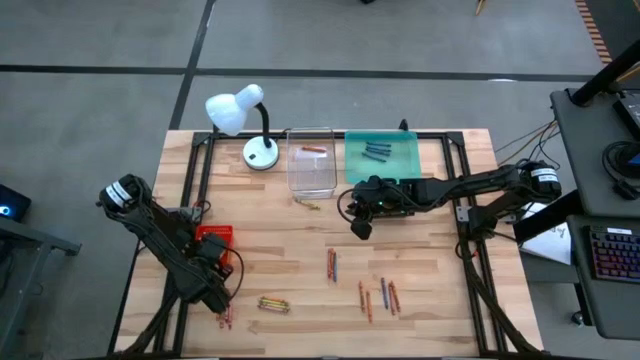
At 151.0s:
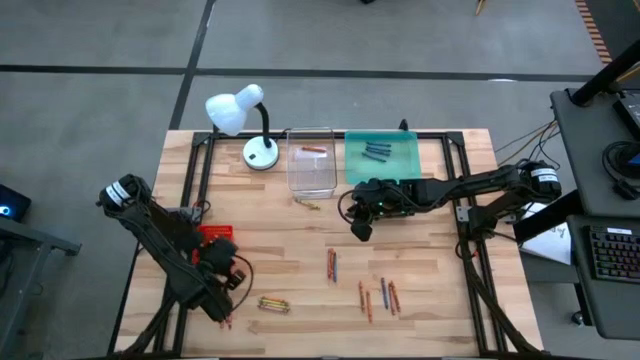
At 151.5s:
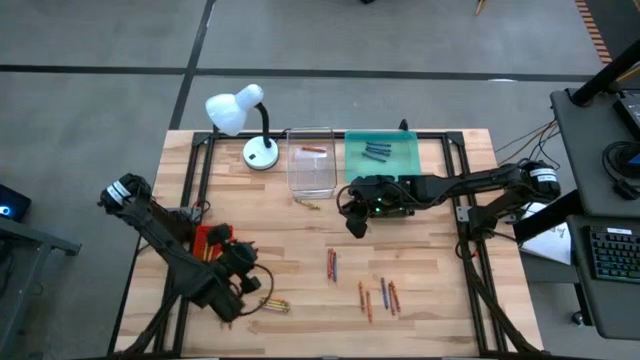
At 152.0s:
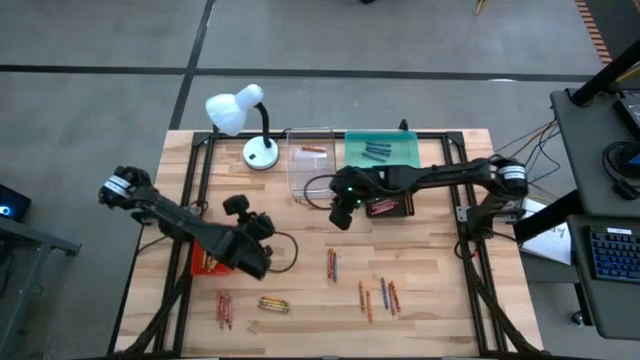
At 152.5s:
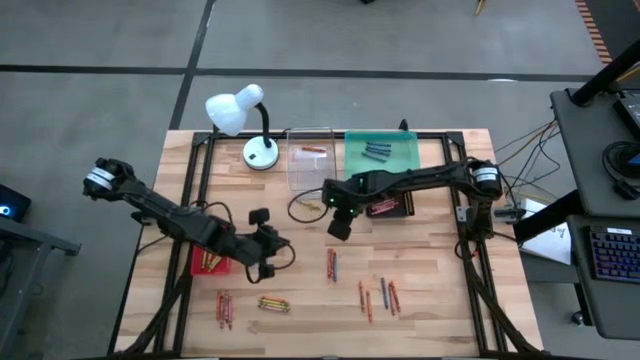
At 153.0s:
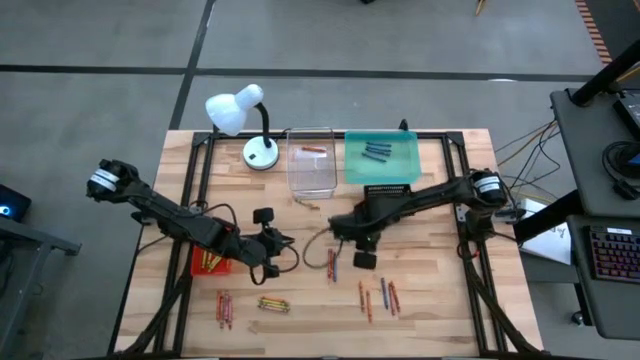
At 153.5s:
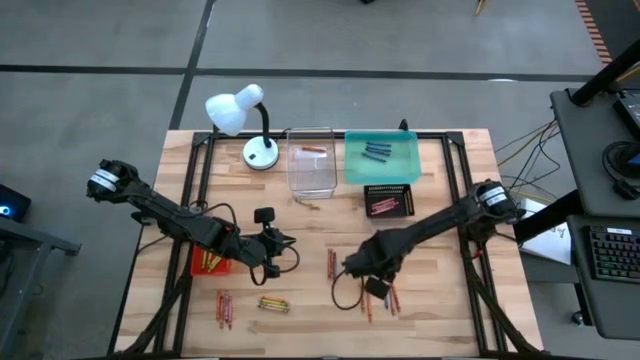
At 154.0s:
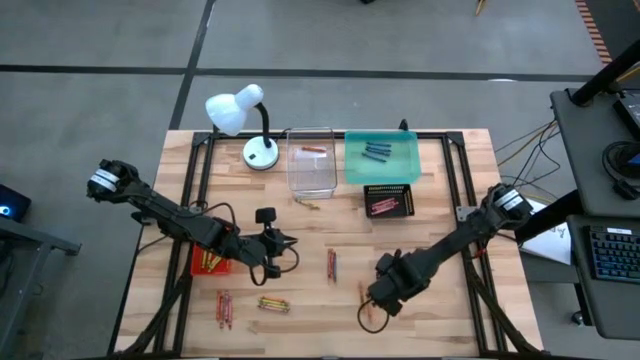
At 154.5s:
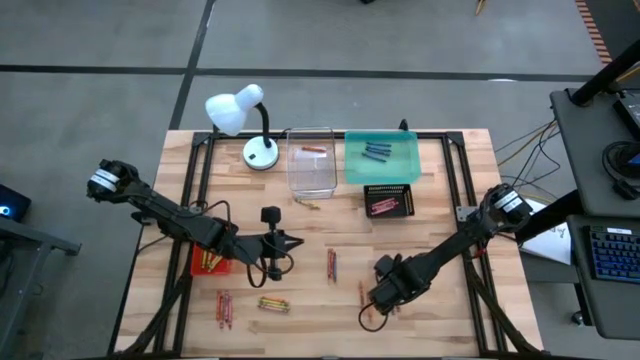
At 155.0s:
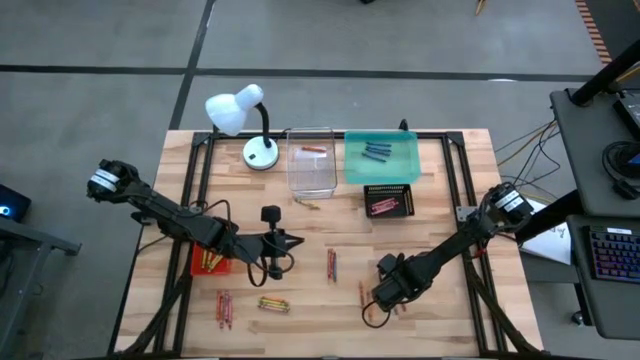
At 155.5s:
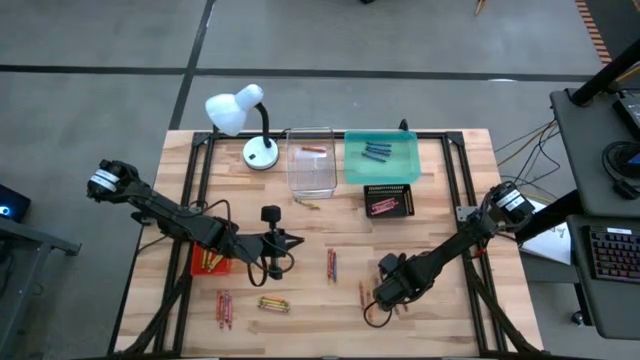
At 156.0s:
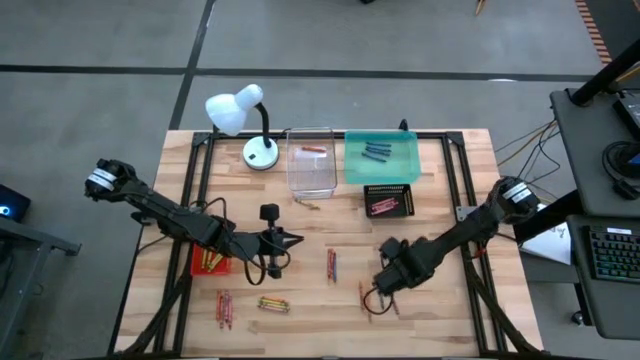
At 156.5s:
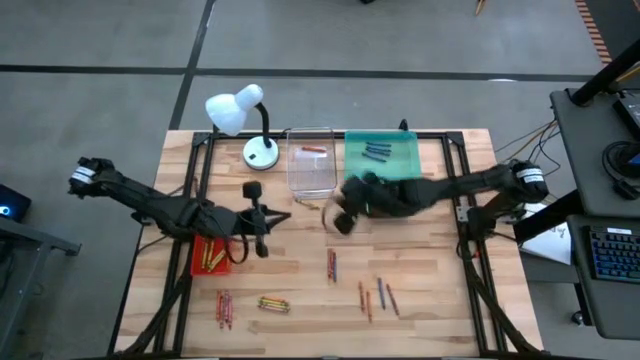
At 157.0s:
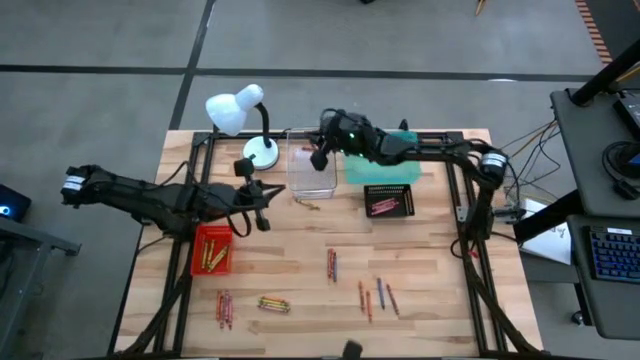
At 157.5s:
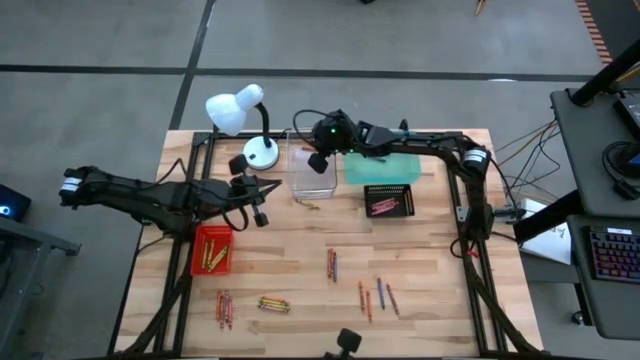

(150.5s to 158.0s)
Task: Sort crayons
Put the orange crayon into the transparent bin

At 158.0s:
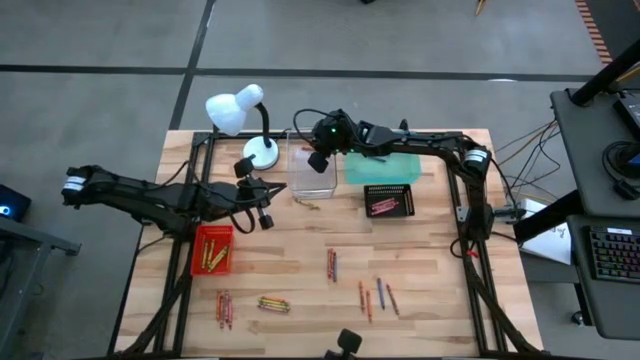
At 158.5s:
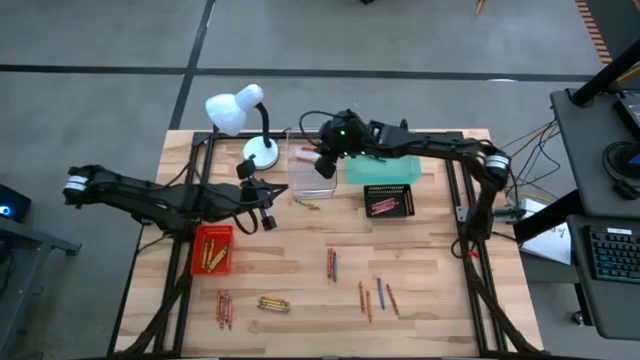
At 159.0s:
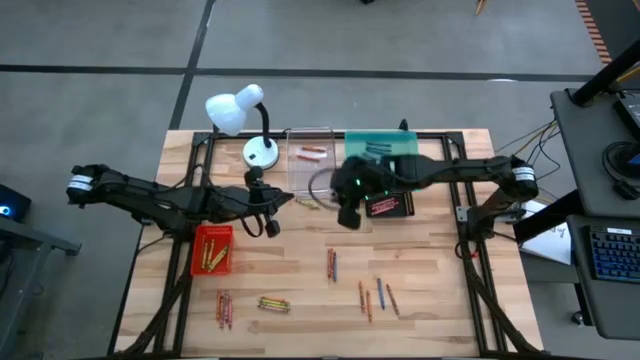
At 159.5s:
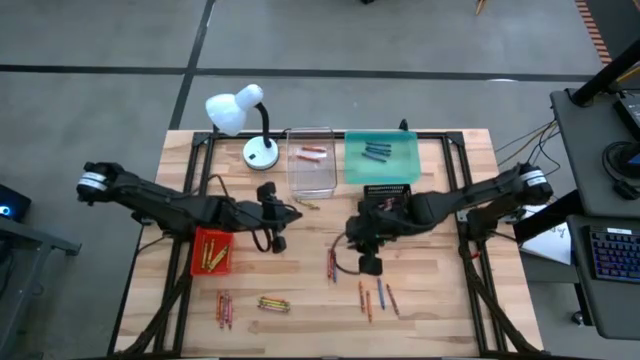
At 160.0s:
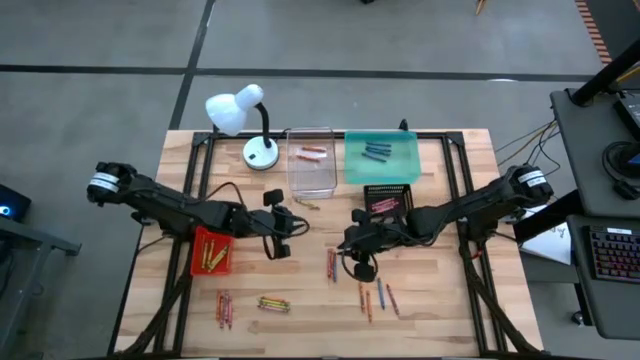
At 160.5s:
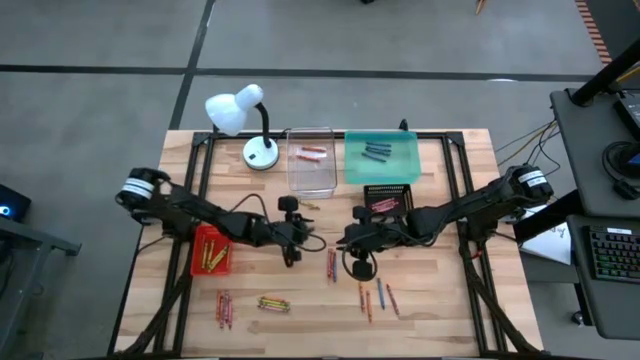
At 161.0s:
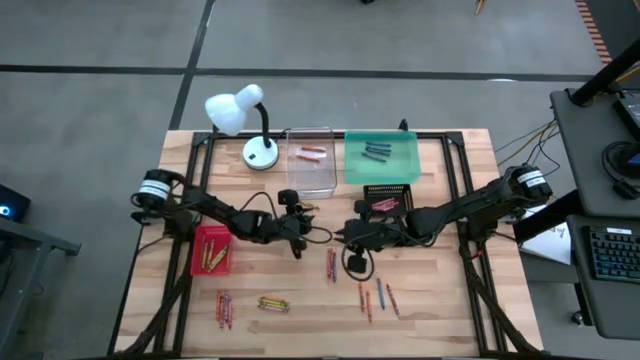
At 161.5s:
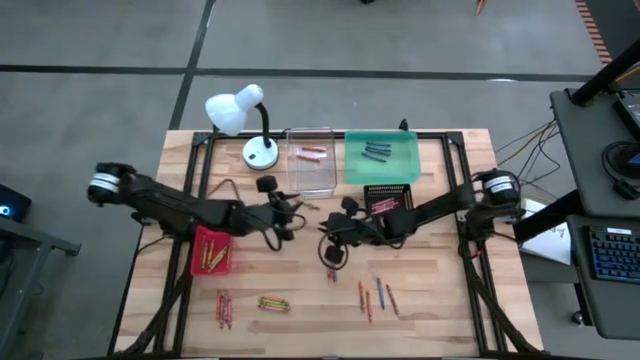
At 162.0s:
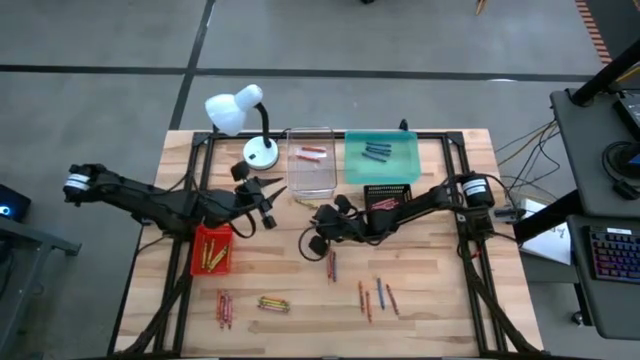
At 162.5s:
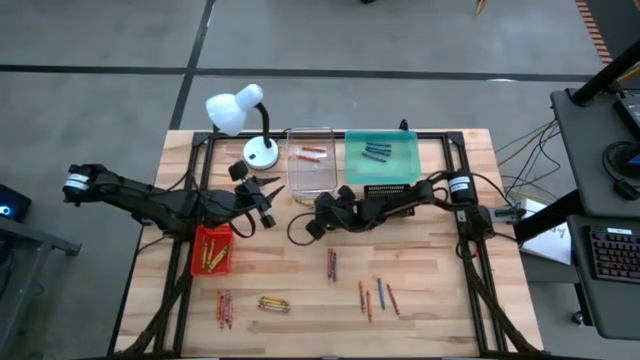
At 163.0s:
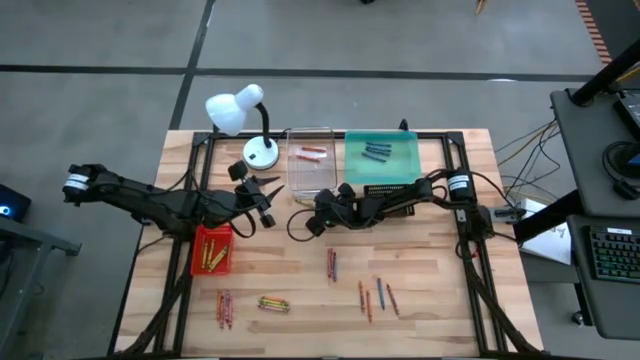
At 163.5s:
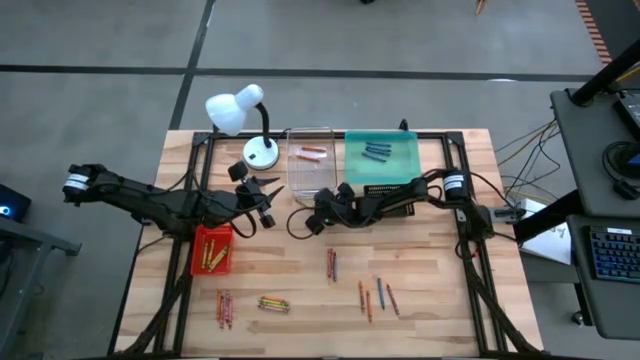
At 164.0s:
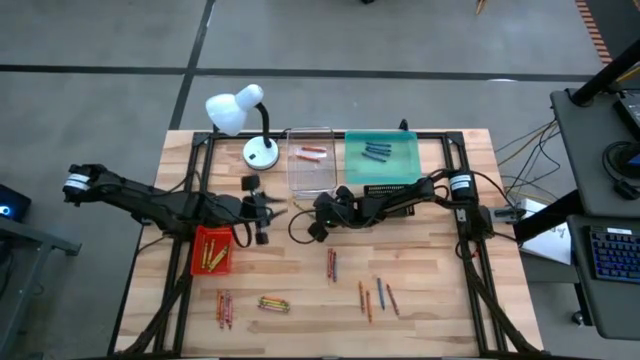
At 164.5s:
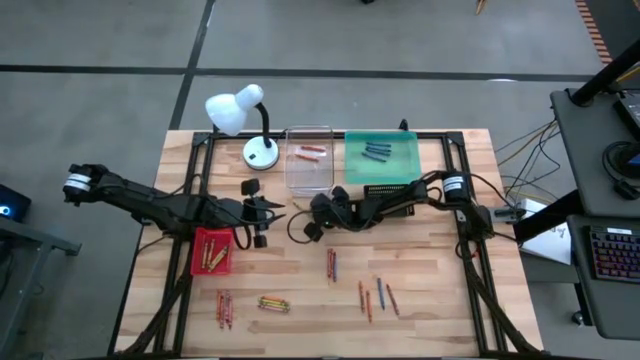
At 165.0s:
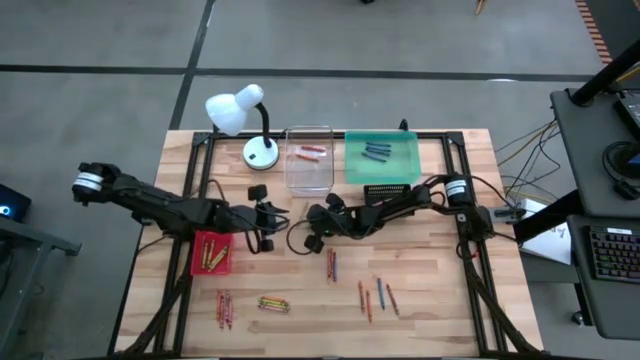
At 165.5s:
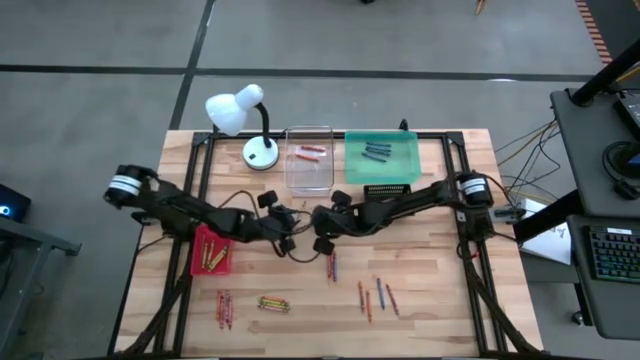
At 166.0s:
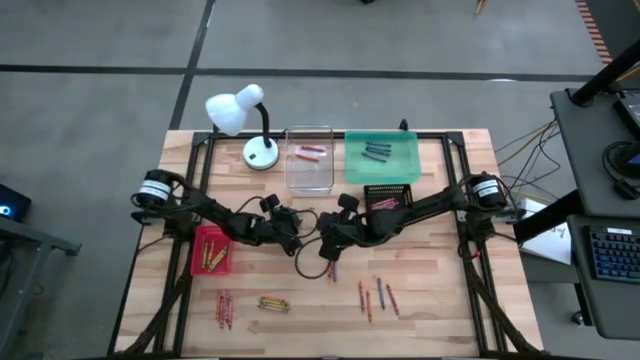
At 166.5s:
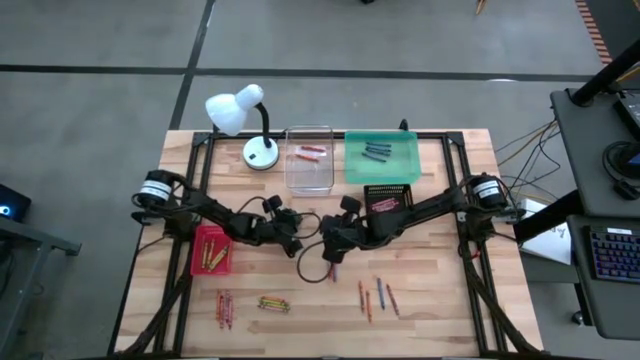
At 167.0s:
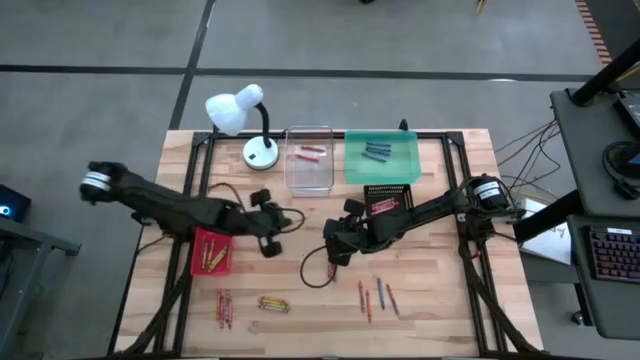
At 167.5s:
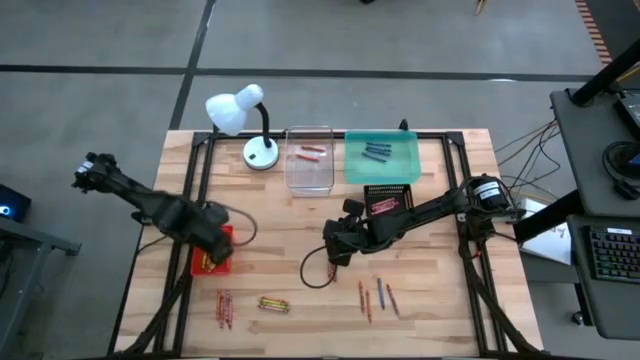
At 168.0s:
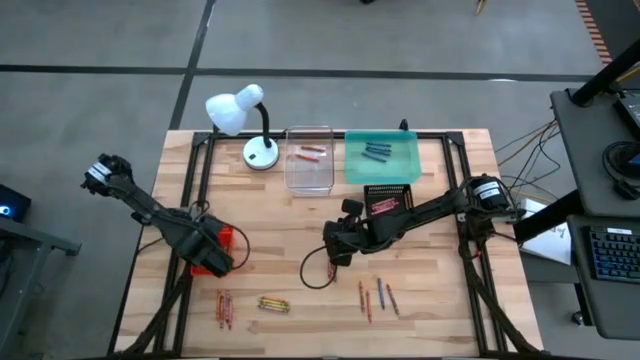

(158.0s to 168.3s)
Put the green crayon into the orange bin

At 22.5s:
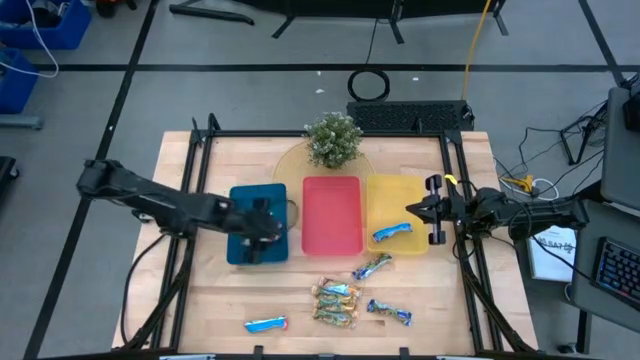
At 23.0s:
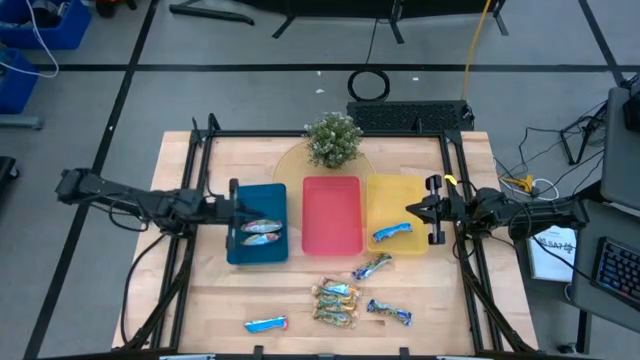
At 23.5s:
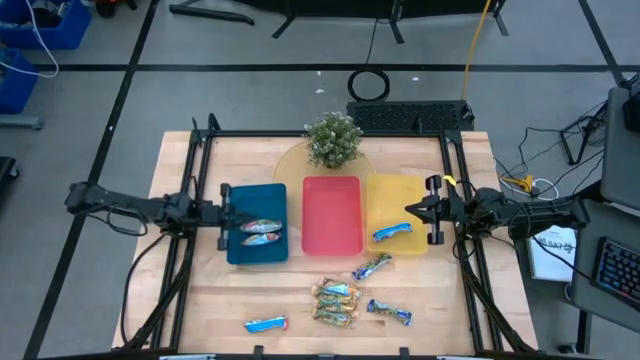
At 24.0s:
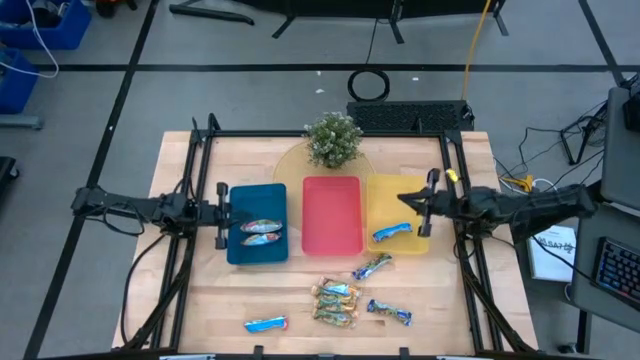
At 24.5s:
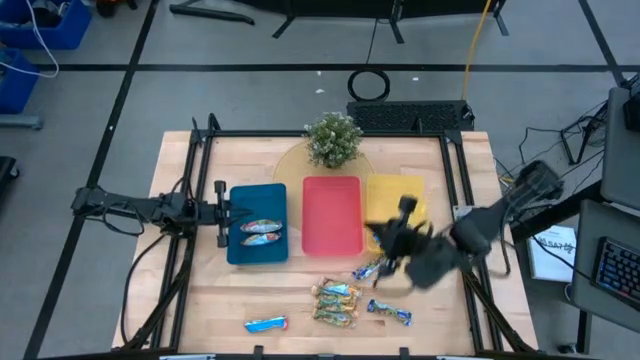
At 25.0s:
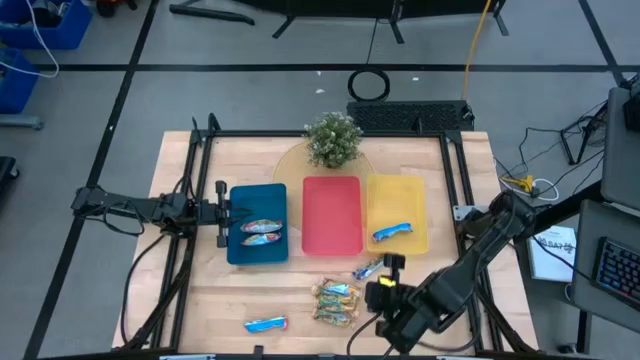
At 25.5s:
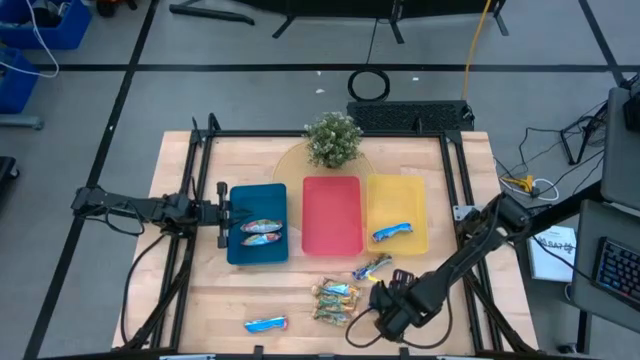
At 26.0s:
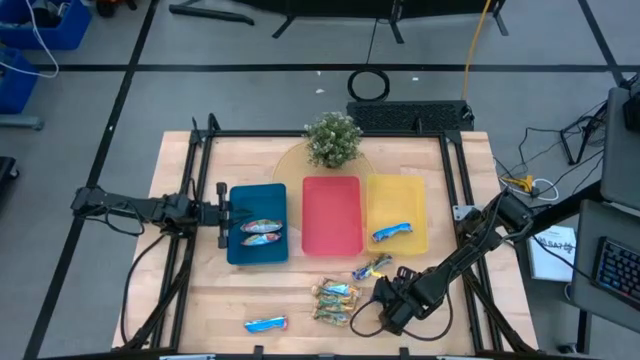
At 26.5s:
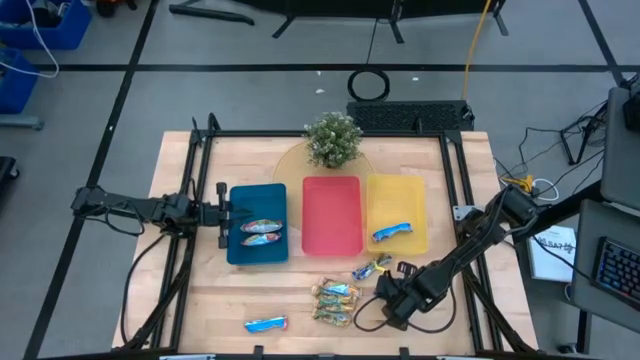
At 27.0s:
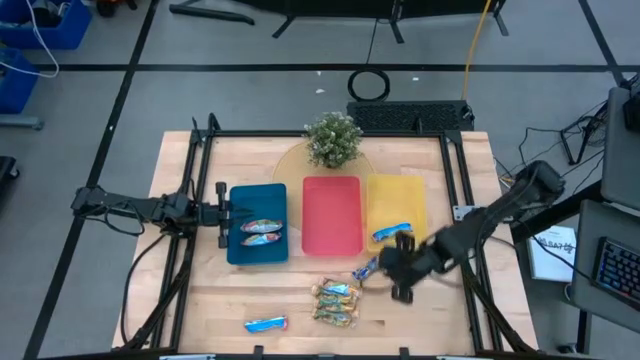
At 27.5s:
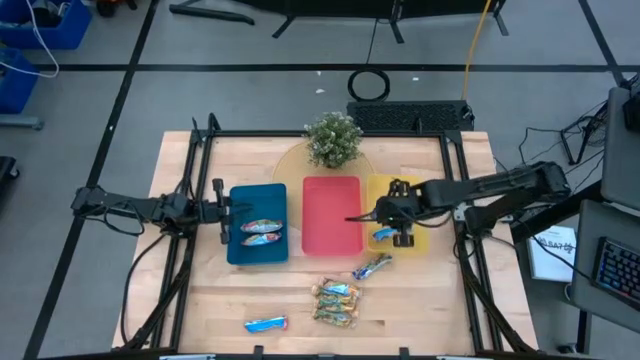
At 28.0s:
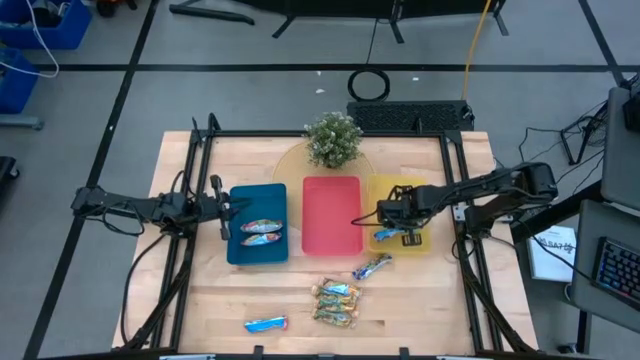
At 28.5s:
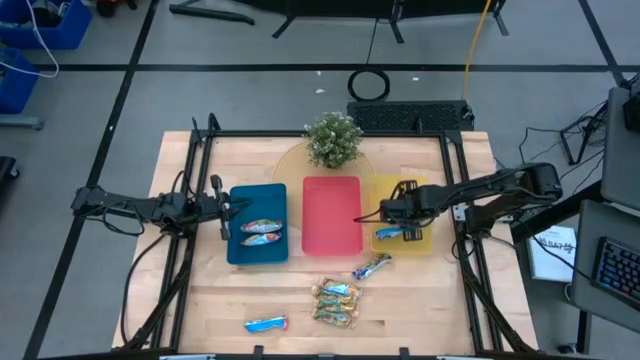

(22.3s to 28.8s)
Task: Pick and place Granola Bars by type
Put the blue granola bar into the yellow bin
